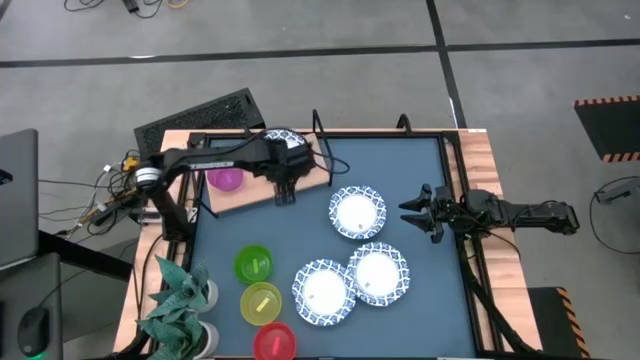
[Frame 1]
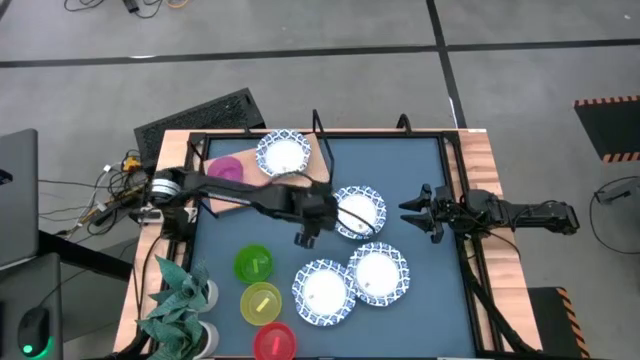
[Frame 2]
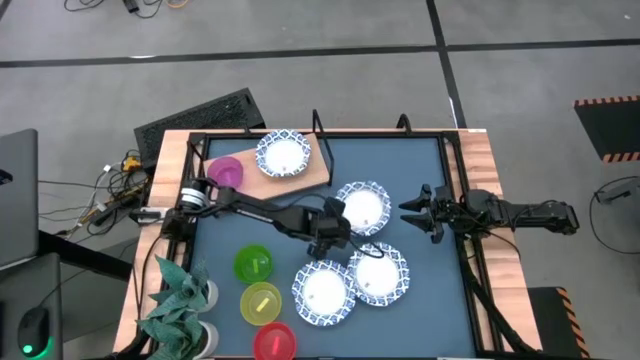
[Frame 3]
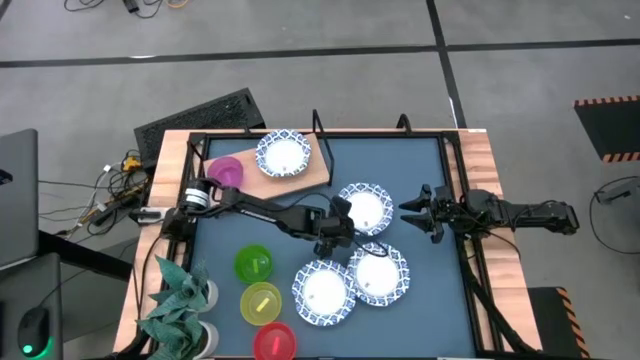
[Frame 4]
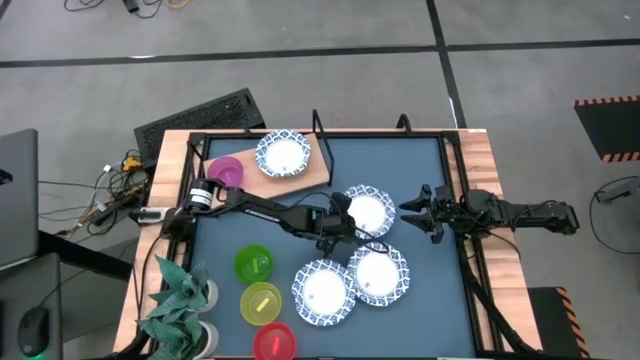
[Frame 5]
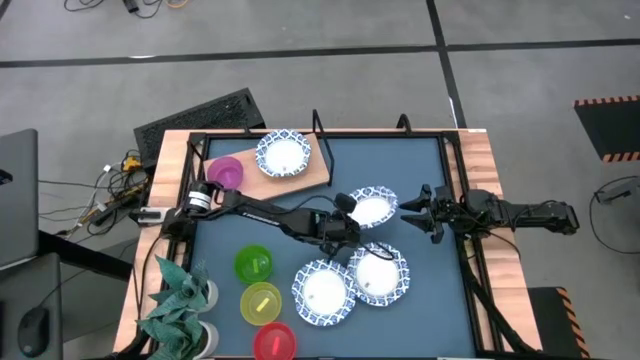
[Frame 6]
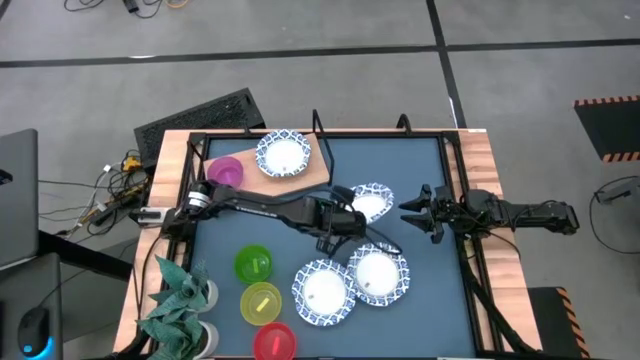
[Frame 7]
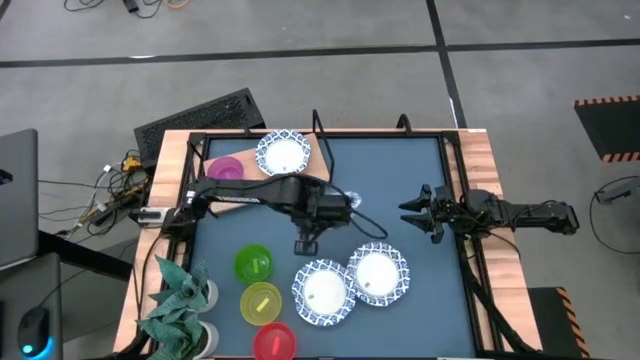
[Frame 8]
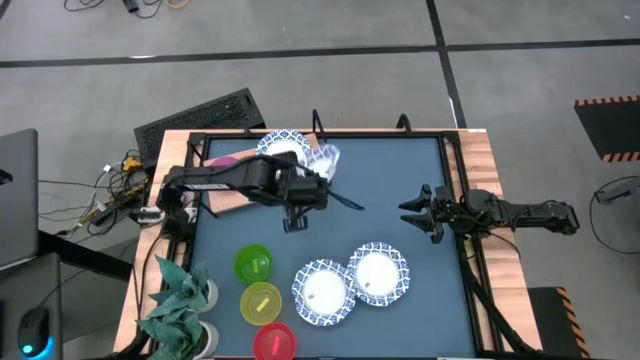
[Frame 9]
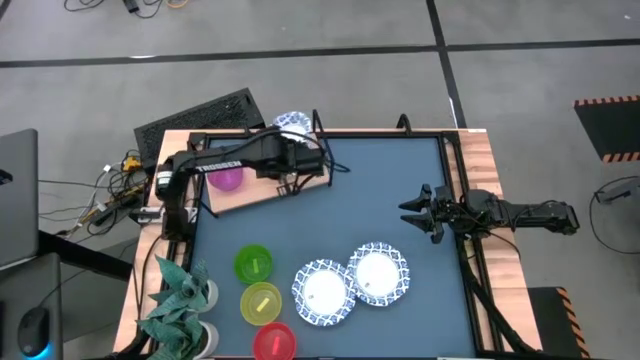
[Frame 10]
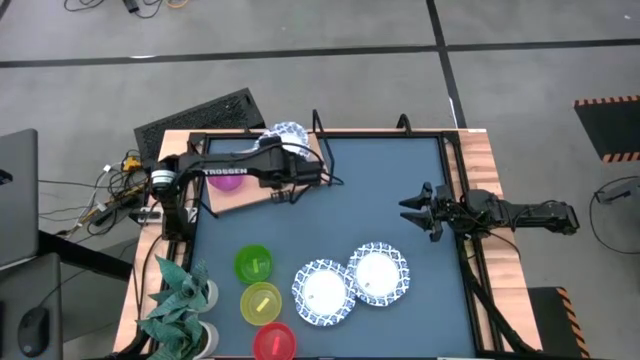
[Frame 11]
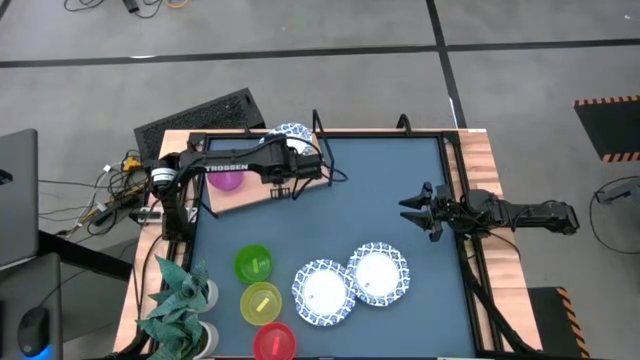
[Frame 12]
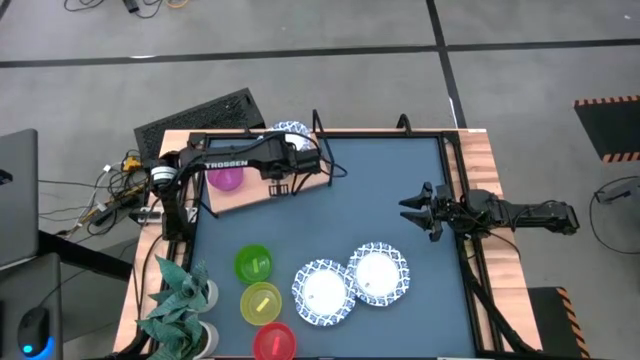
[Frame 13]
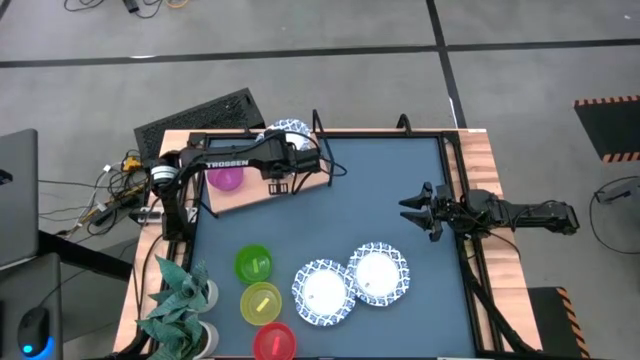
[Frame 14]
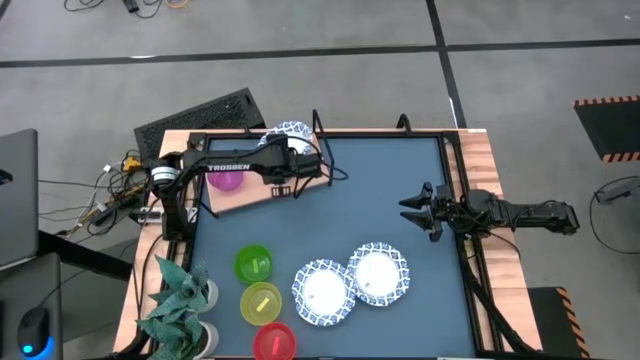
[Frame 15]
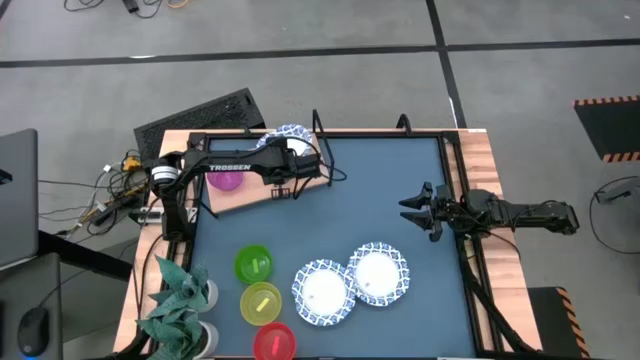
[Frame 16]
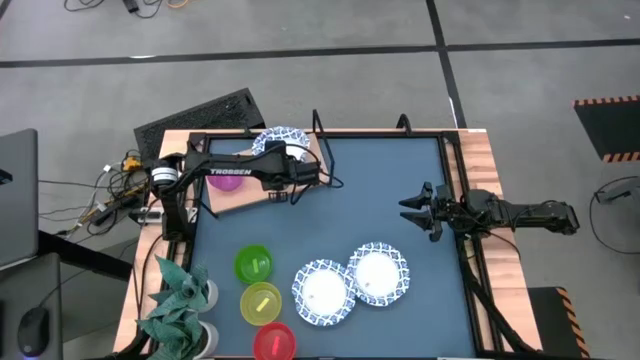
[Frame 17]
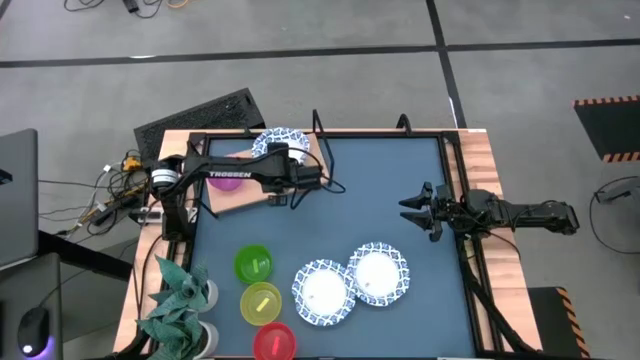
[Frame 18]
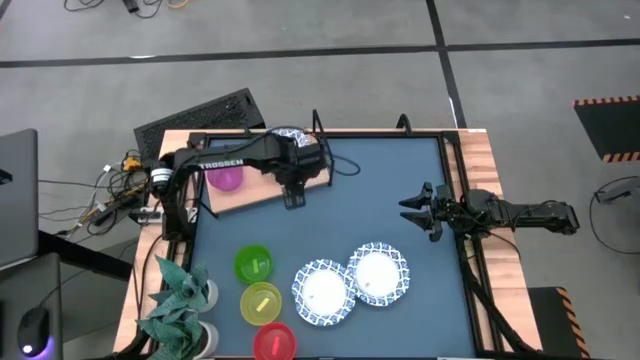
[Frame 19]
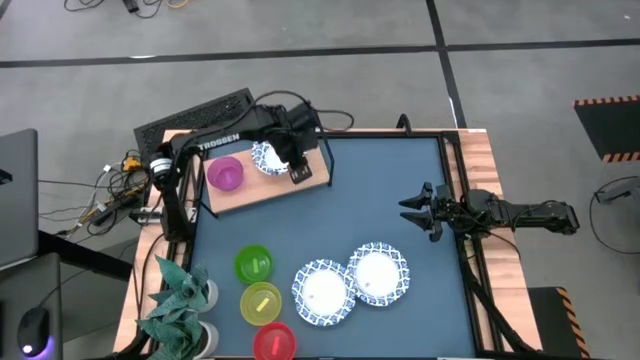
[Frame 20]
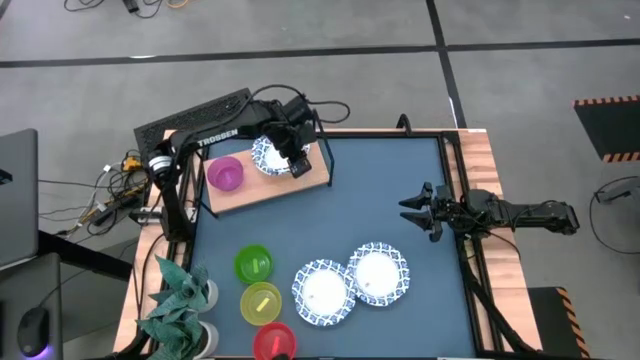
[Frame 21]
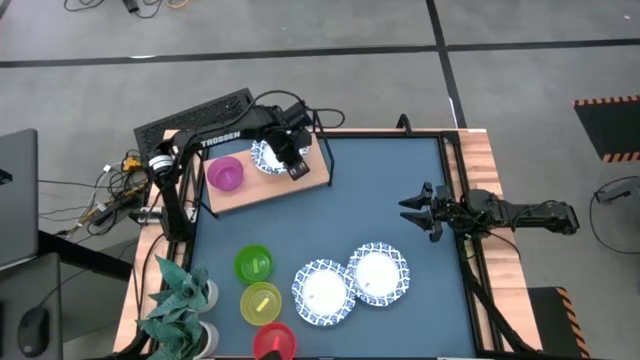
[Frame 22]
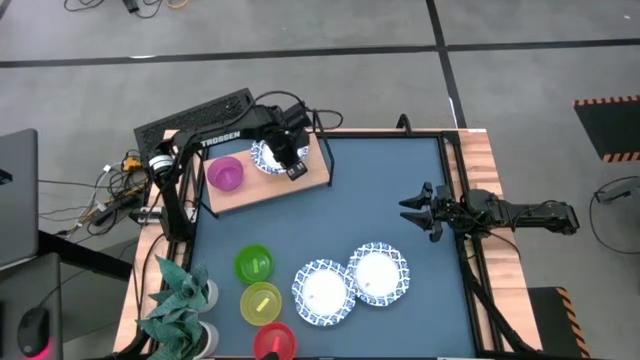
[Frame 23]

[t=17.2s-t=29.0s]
Task: Place and stack bowls onto a shelf
Stack the top right white-blue bowl on top of the other white-blue bowl on the shelf

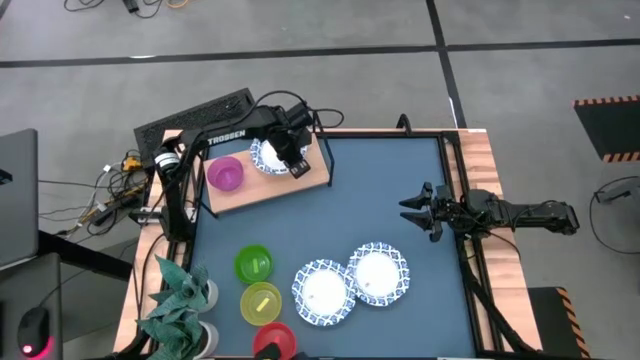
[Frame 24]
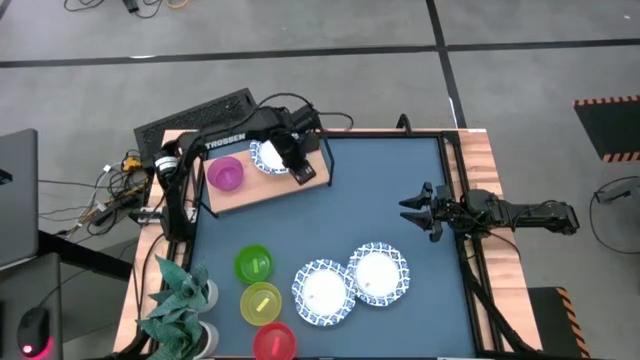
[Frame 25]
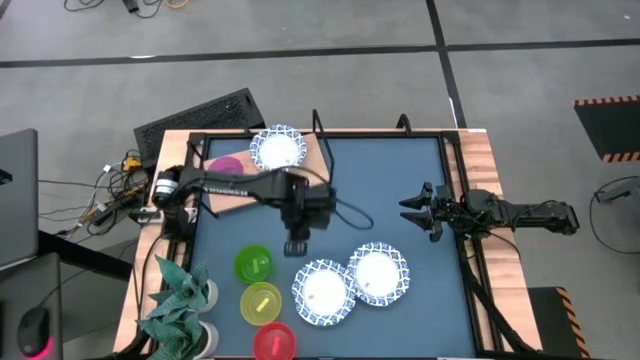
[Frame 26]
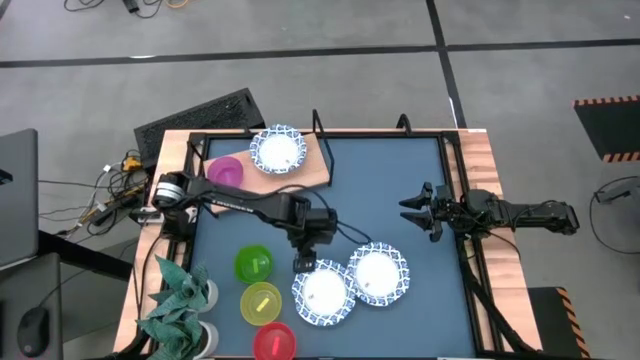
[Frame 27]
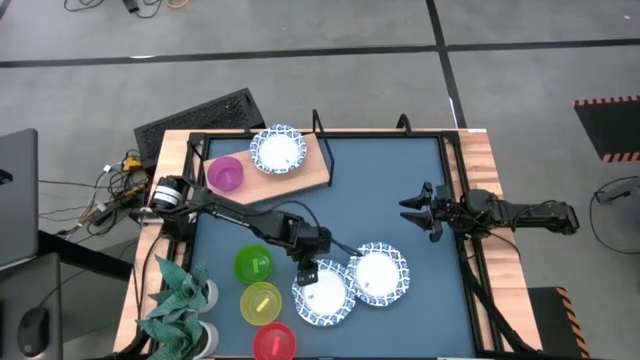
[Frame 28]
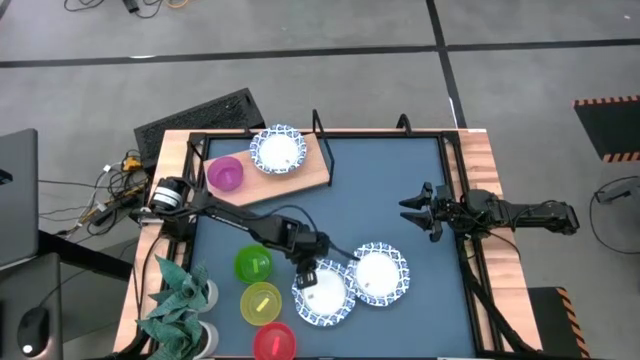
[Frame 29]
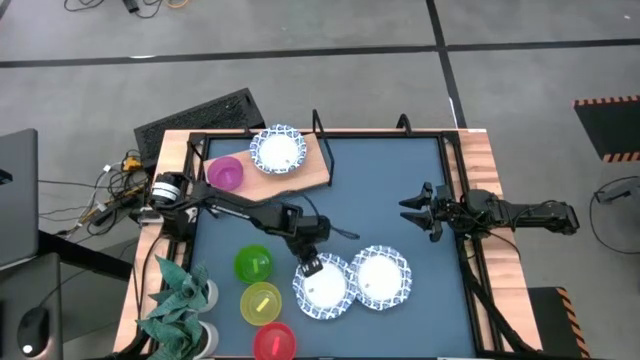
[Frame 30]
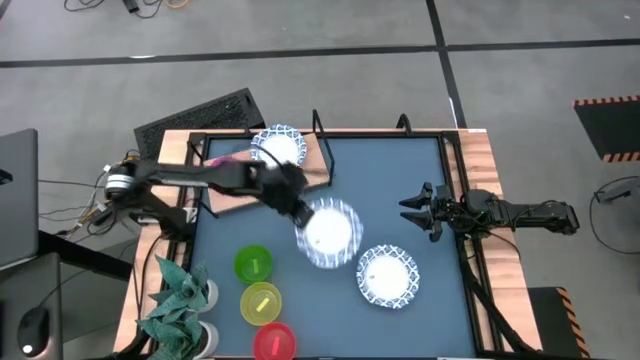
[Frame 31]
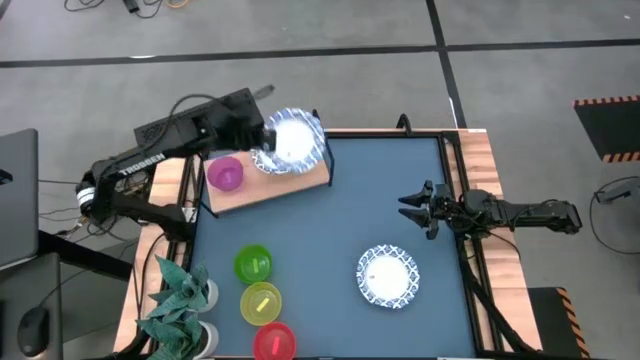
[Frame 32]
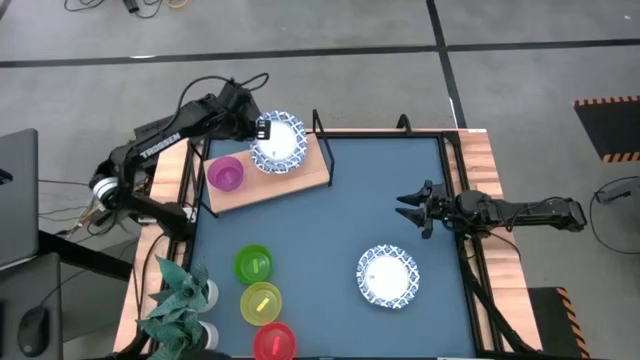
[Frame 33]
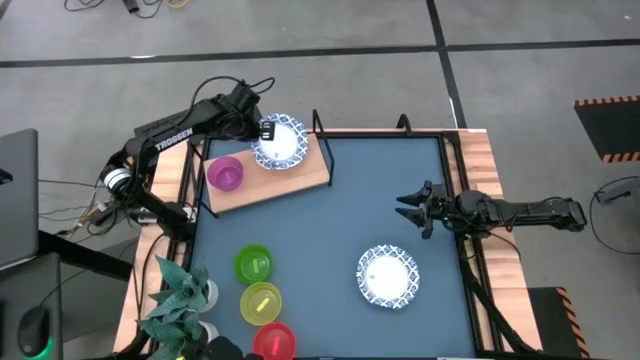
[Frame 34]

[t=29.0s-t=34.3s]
Stack the left white-blue bowl on top of the other white-blue bowls on the shelf

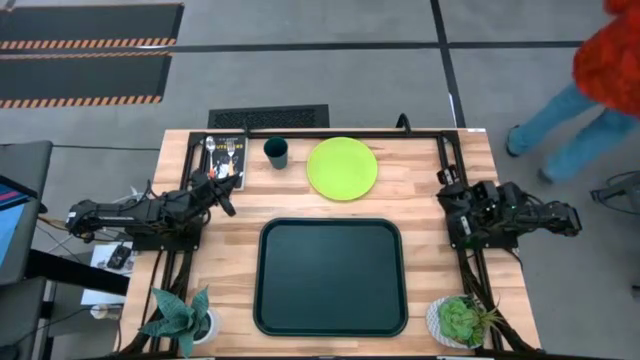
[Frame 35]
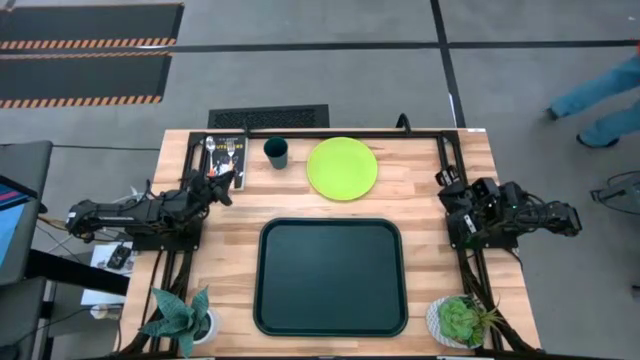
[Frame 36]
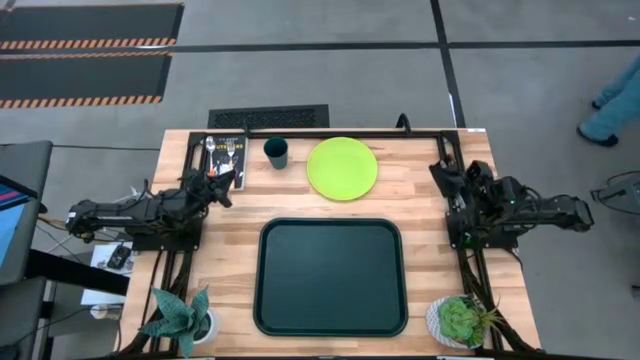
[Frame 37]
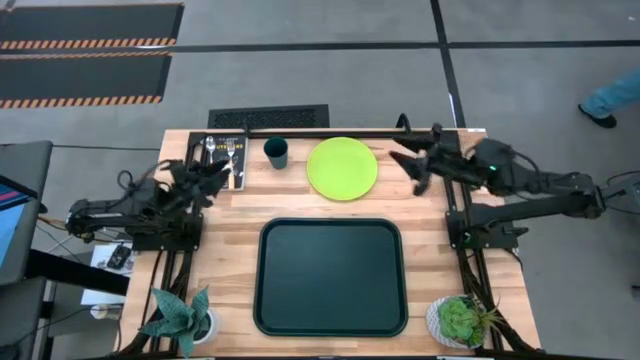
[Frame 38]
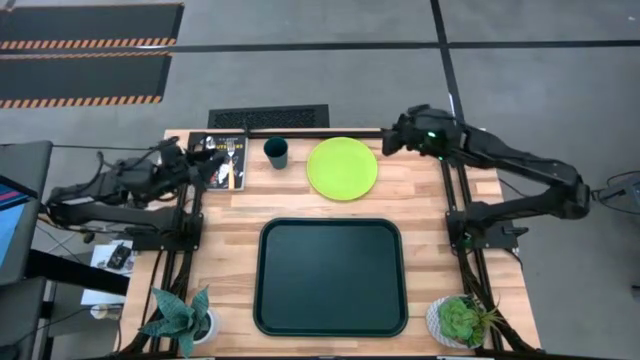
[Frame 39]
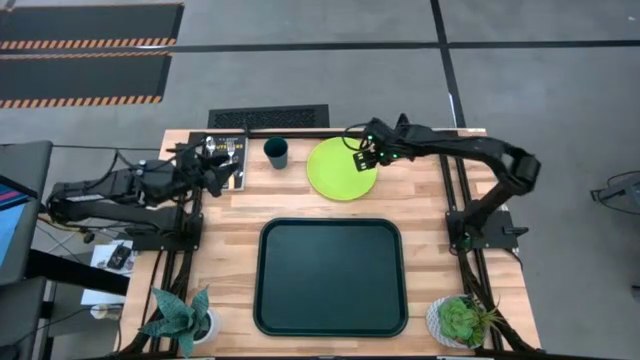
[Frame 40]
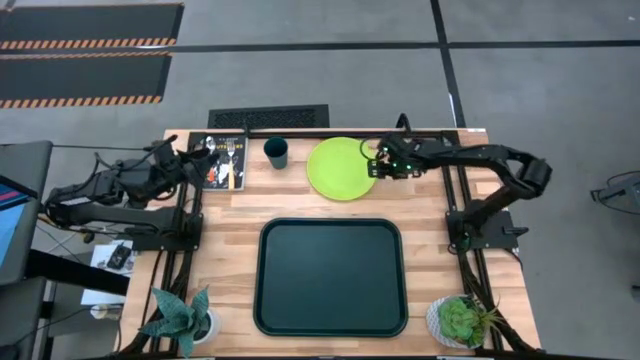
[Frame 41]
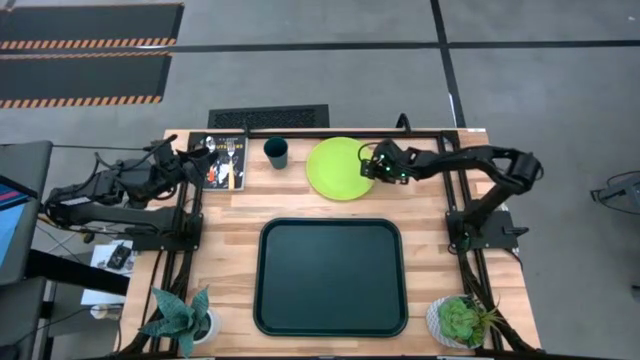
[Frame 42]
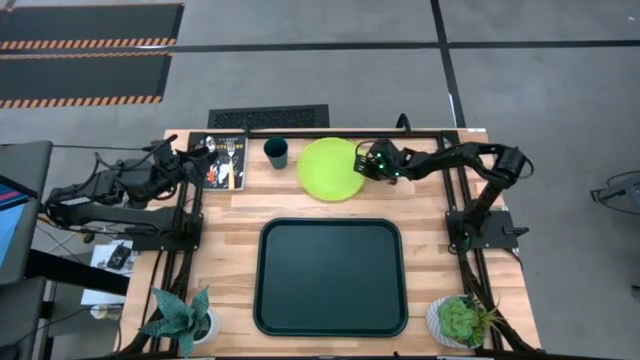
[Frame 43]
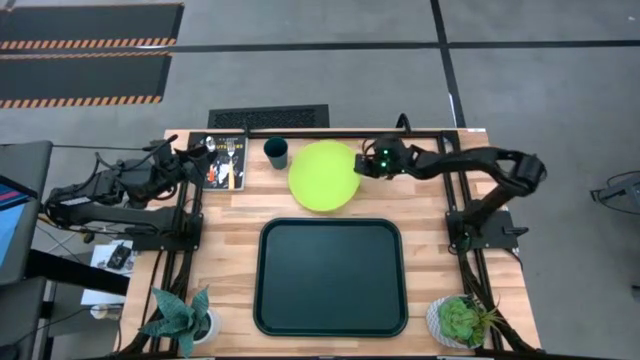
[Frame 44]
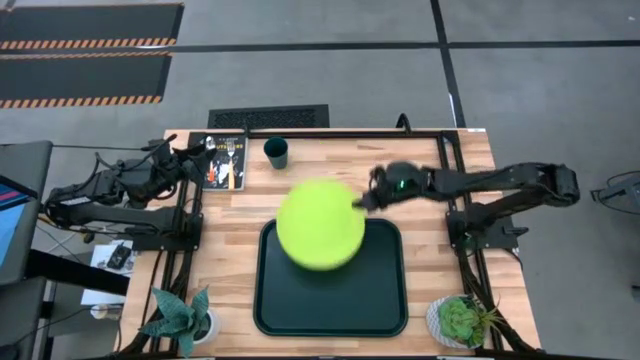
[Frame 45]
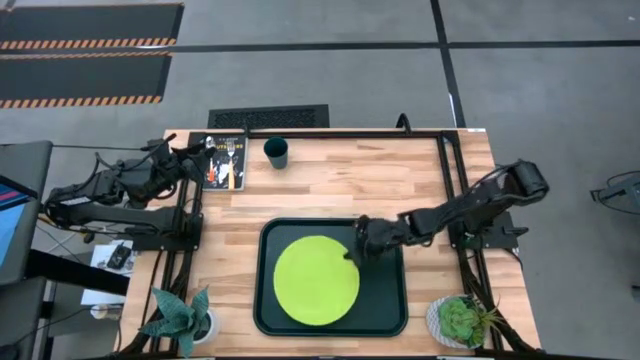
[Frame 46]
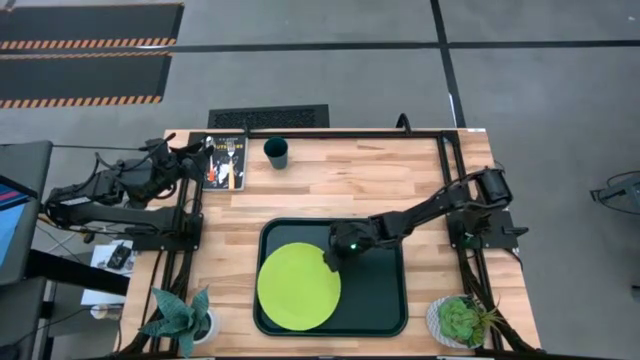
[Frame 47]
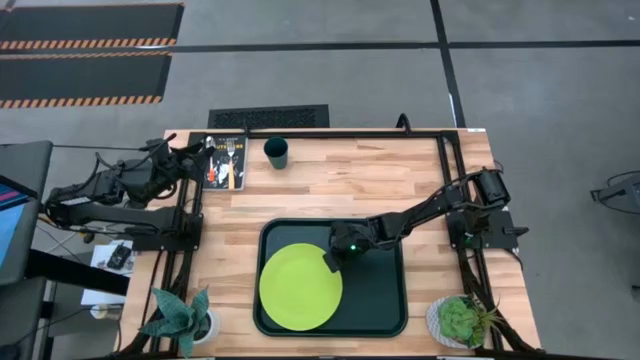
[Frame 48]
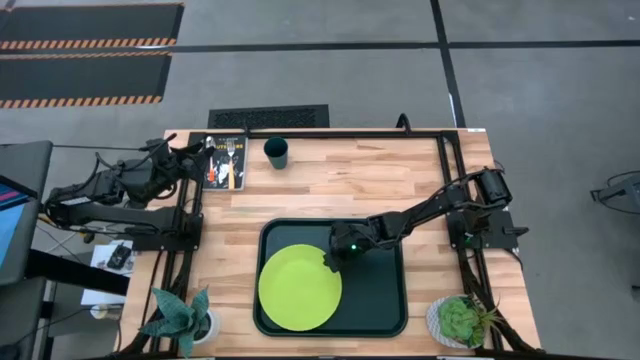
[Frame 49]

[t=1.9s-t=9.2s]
Task: Pick and place plate/cup/fork/spoon on tray
Put the light green plate on the green serving tray
